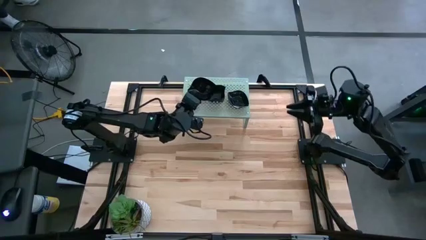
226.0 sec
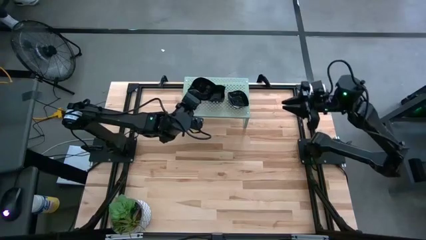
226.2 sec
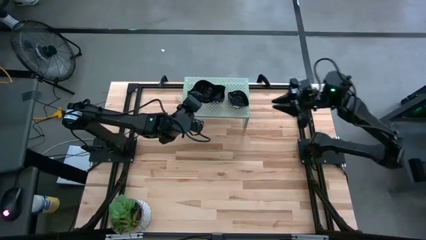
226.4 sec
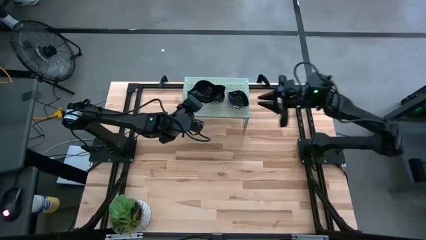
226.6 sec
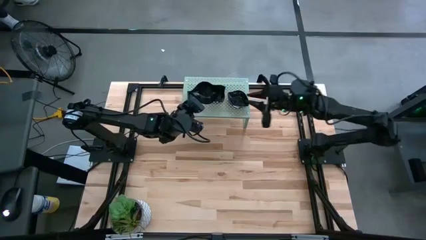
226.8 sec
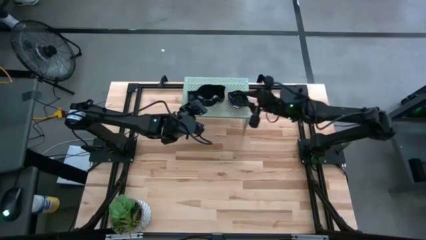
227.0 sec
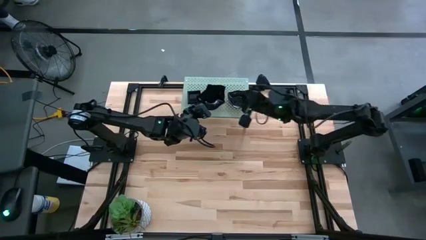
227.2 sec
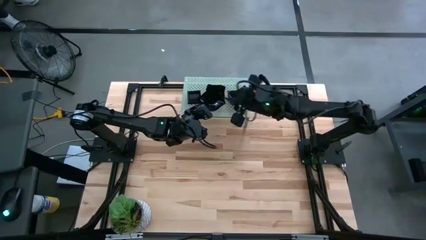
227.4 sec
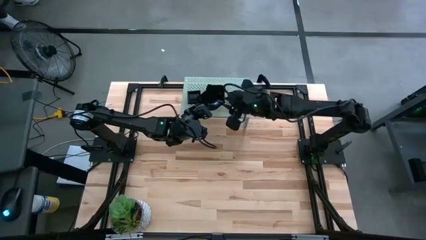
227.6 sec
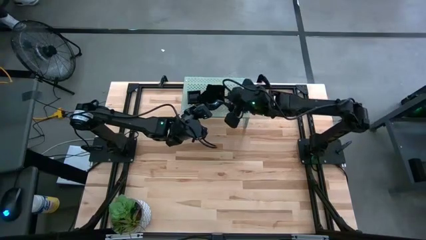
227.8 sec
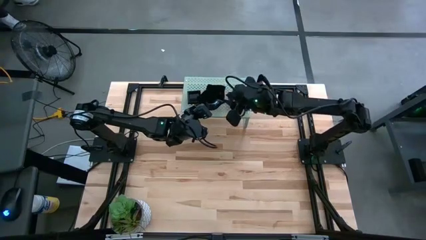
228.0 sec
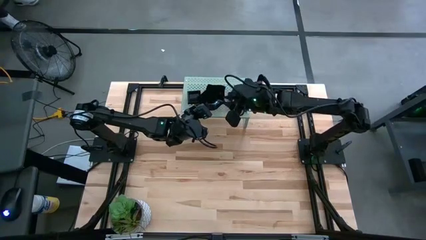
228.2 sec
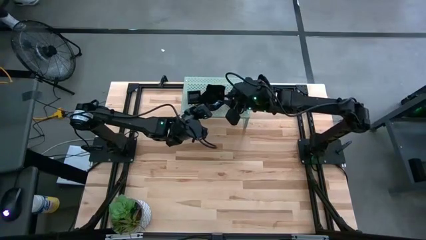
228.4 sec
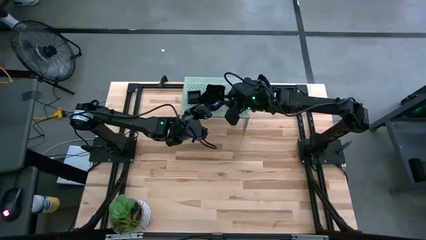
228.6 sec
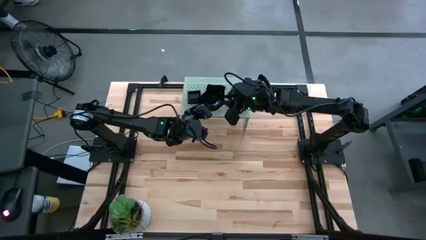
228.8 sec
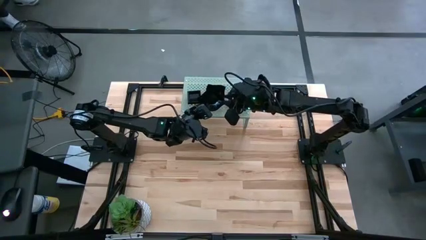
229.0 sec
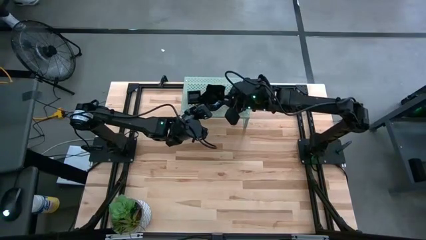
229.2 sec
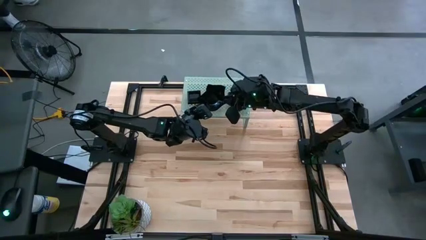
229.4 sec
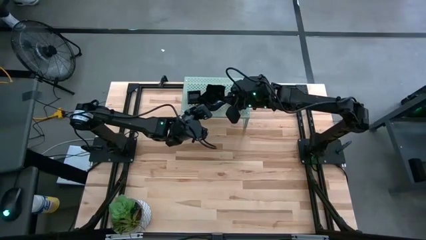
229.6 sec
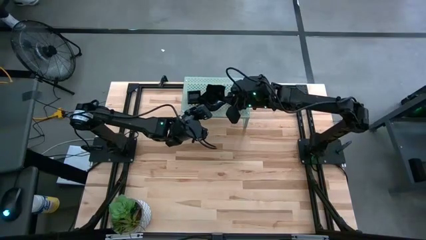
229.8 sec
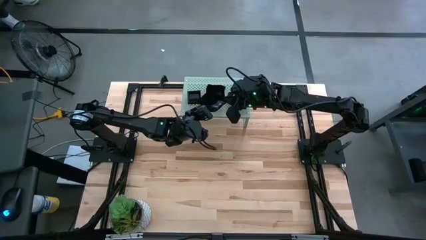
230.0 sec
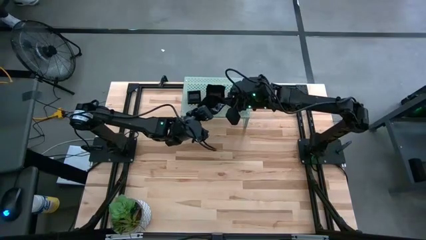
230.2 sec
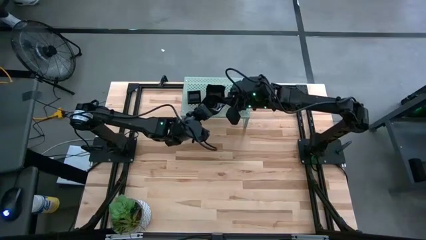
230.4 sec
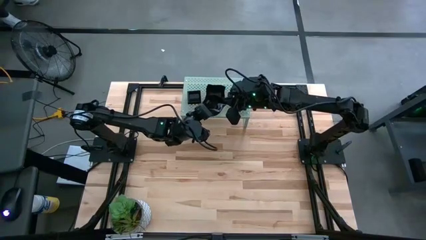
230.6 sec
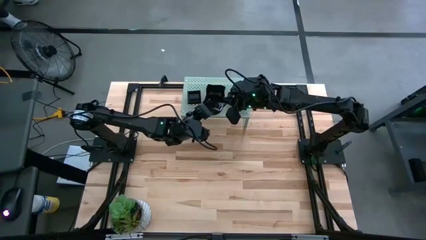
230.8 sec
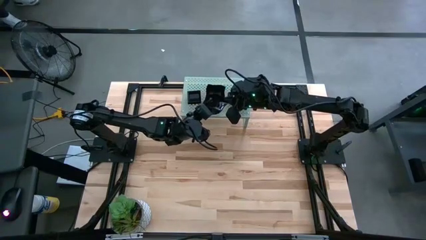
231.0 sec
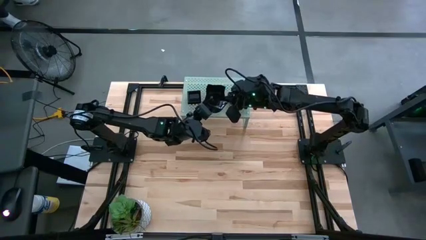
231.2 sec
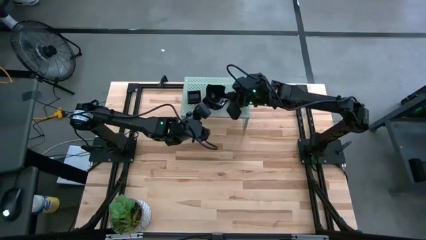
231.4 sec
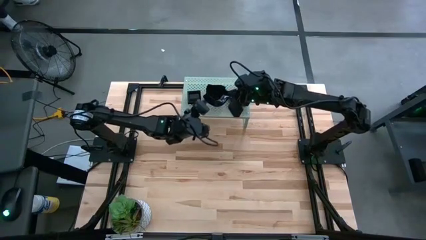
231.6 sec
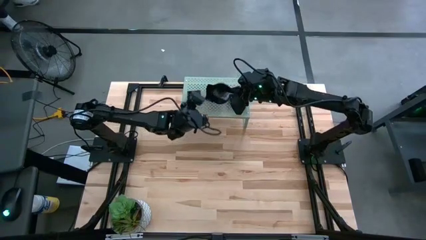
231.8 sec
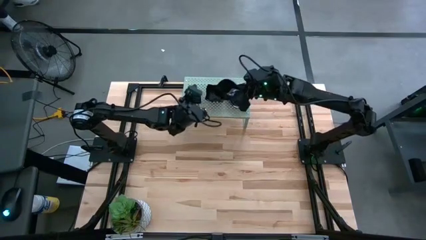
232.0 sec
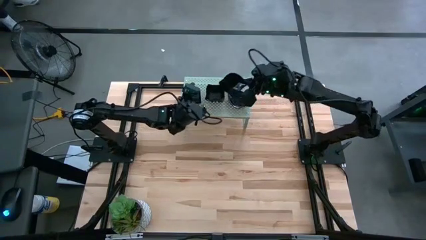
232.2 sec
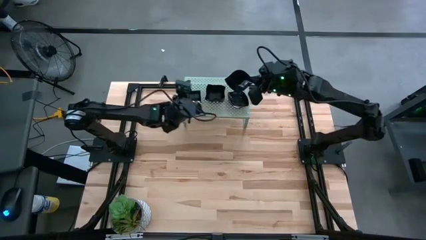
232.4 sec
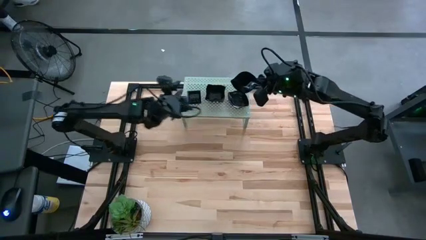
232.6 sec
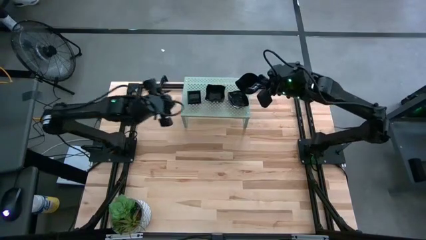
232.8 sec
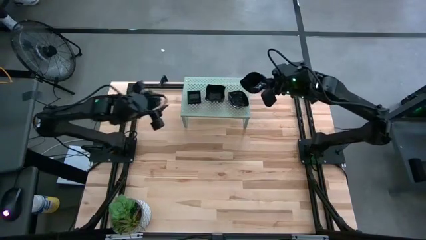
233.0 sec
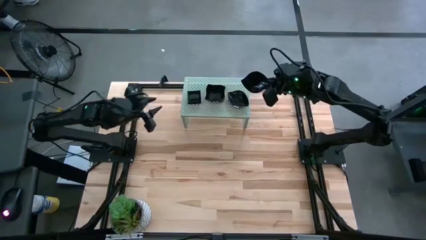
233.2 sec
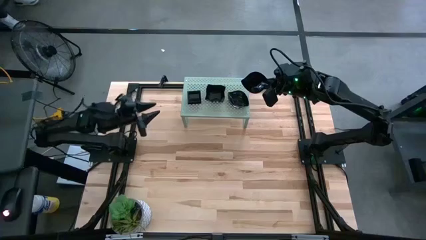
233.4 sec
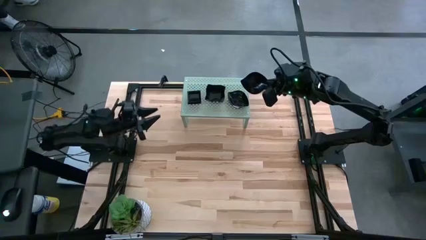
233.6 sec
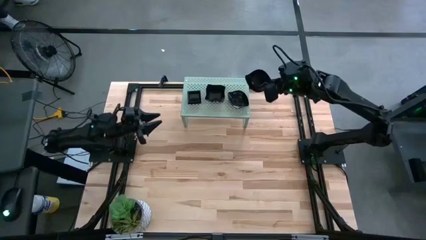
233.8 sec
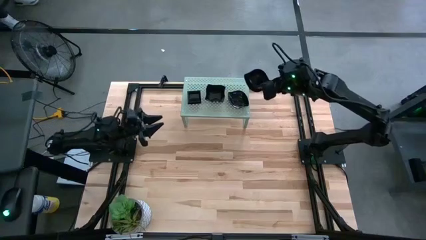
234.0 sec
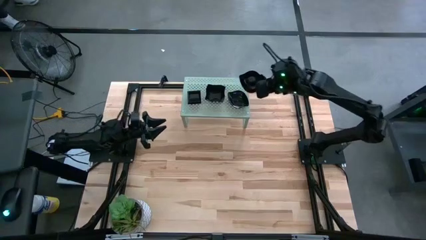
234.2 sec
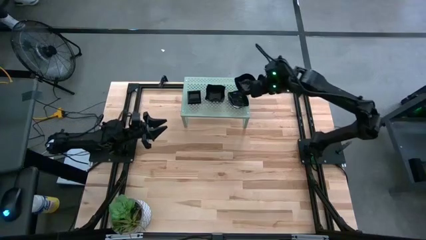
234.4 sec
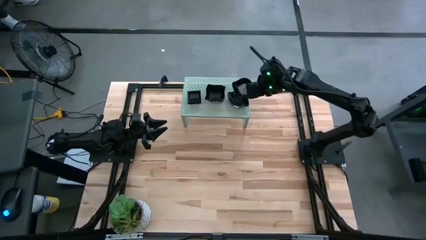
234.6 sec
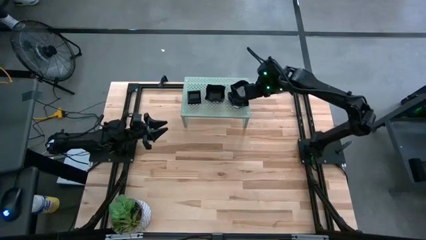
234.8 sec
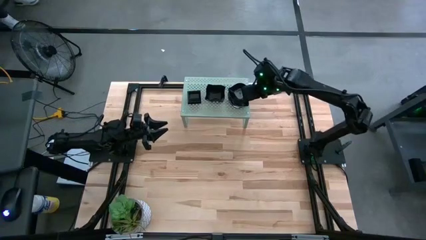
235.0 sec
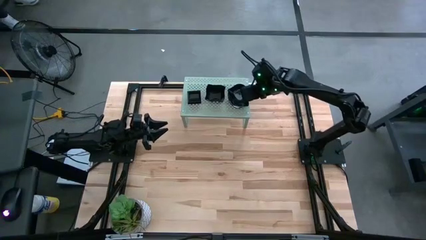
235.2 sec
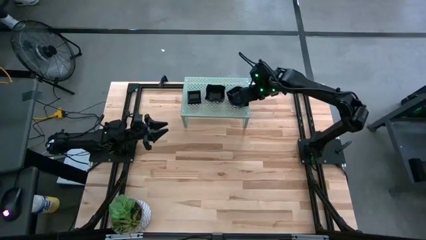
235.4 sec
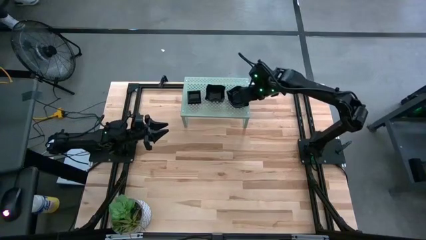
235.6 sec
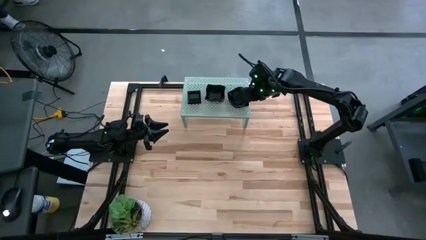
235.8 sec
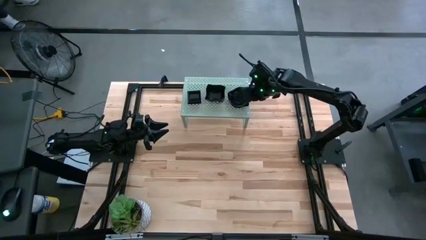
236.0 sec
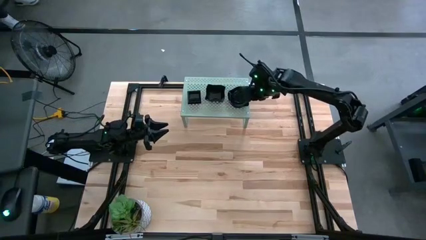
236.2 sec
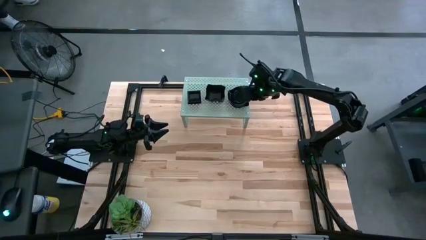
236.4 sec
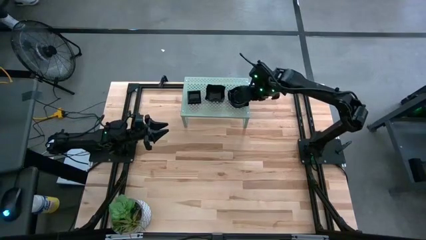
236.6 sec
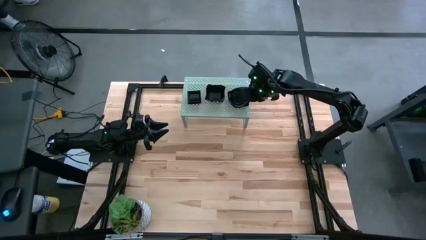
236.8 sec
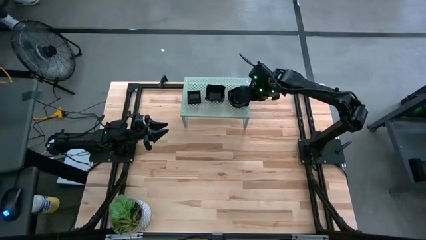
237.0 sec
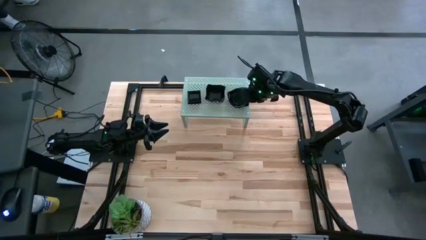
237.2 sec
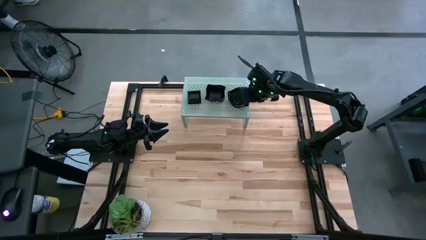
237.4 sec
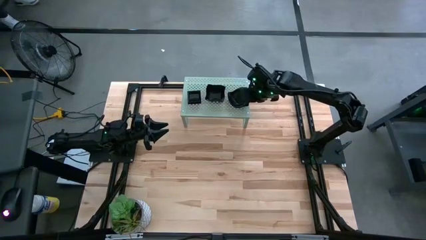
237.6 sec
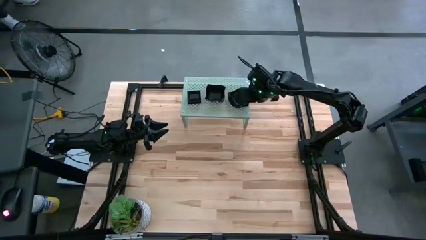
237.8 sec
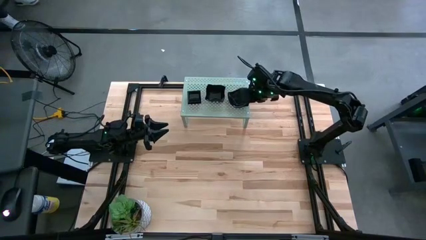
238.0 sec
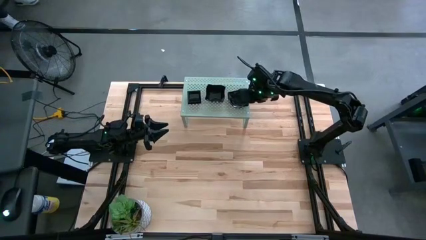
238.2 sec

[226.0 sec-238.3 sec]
Task: Pick & Place Mini shaped plates
Stack the leaf shaped plate on top of the leaf shaped plate on the shelf

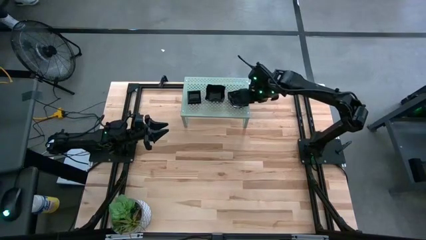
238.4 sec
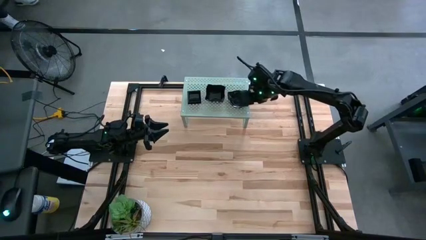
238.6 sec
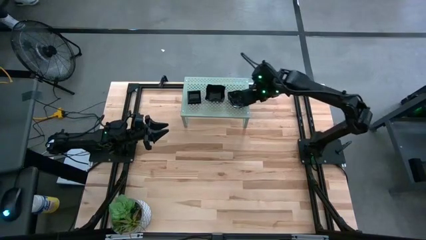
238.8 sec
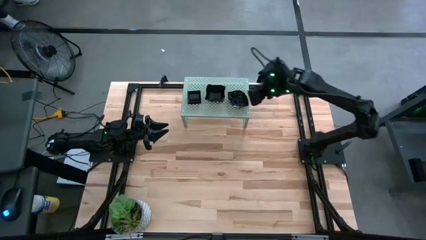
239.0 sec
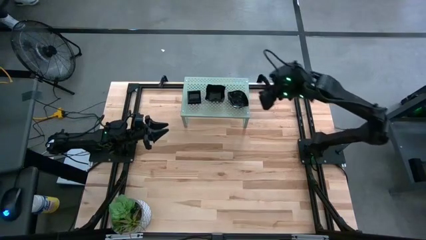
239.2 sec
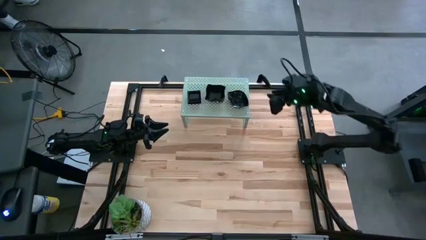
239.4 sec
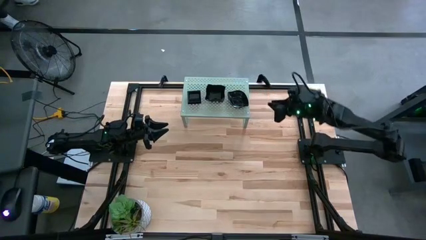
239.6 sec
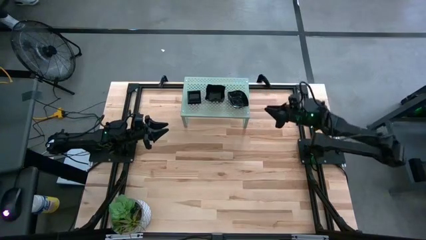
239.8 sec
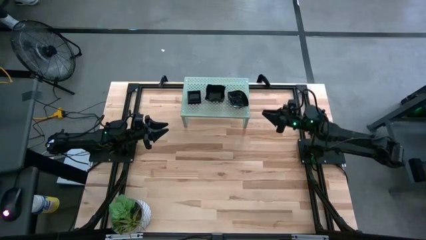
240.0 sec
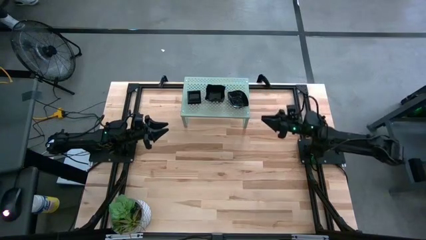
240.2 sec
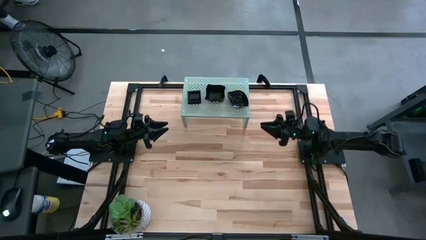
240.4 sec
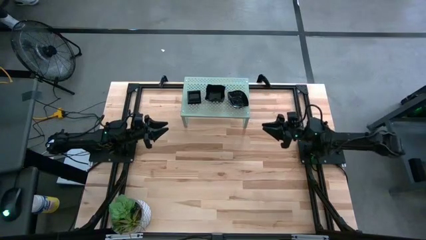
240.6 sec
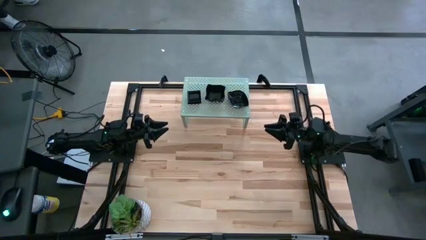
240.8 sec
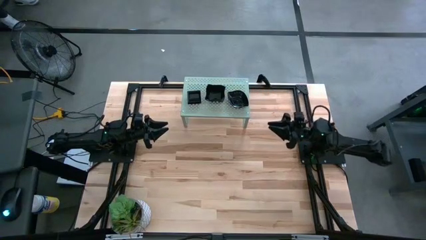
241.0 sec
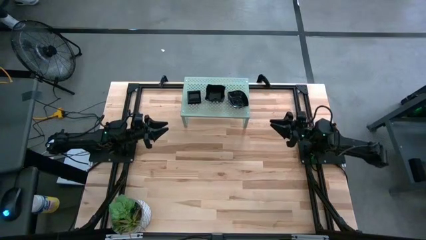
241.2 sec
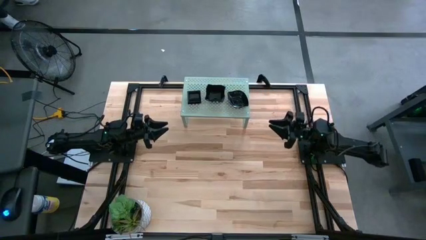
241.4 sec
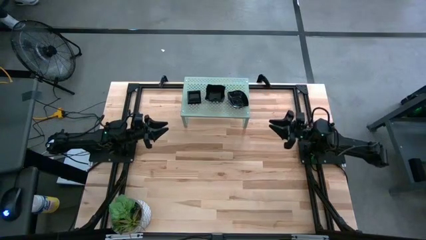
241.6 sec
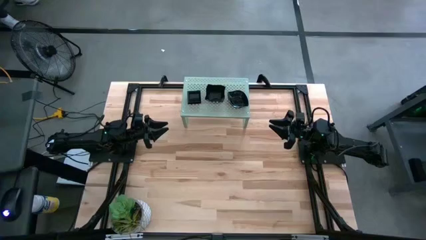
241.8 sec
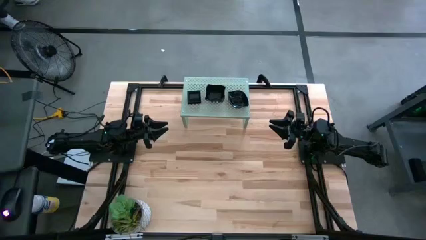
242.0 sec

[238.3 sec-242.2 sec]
Return to Home Position
